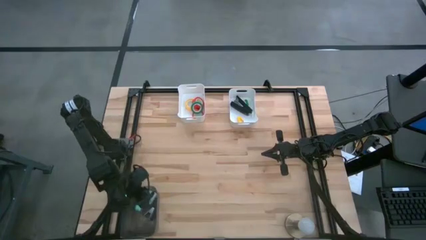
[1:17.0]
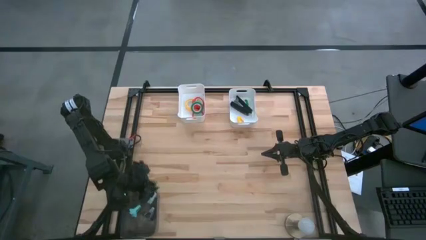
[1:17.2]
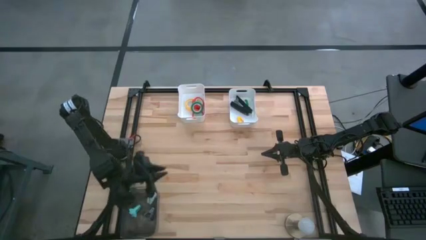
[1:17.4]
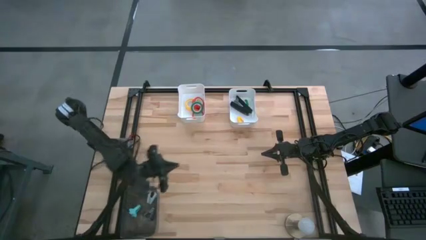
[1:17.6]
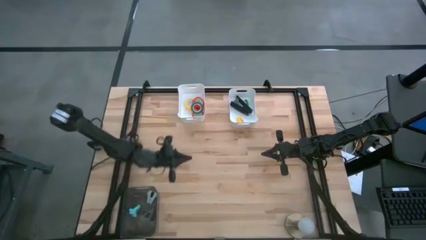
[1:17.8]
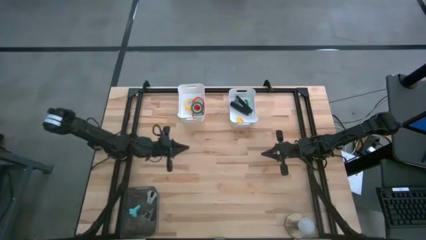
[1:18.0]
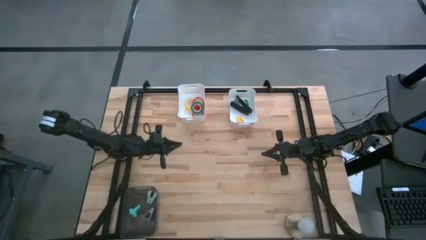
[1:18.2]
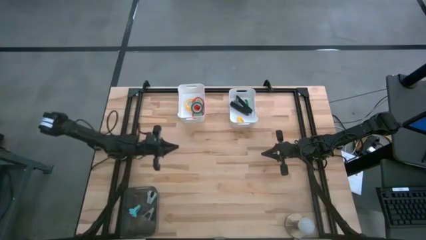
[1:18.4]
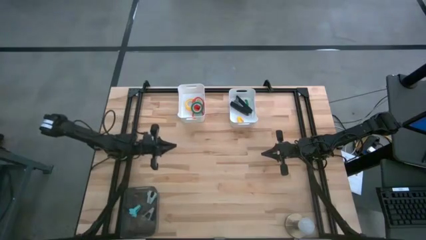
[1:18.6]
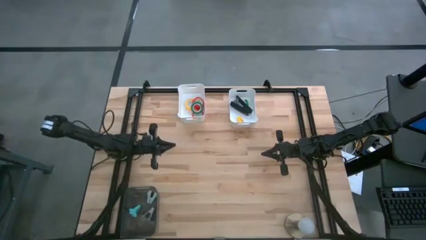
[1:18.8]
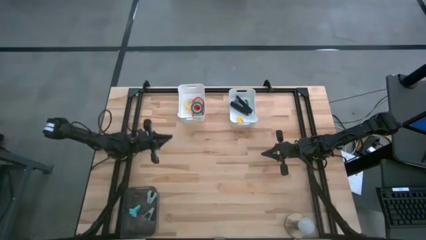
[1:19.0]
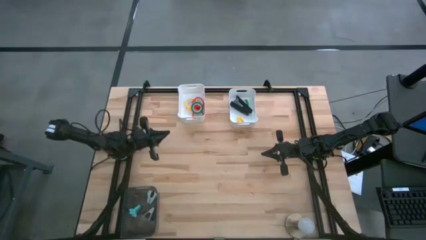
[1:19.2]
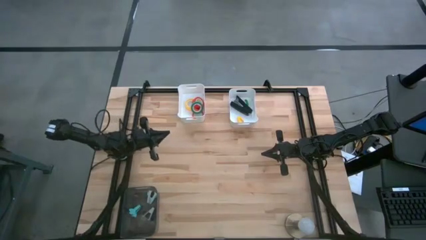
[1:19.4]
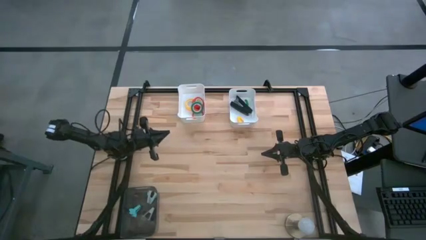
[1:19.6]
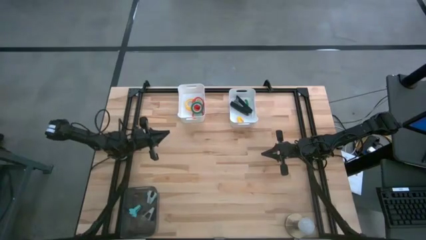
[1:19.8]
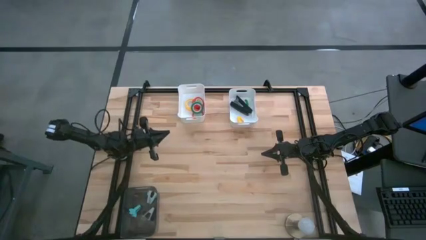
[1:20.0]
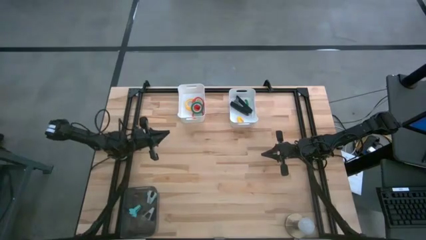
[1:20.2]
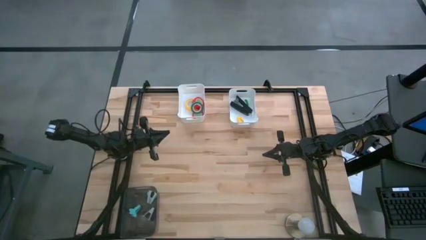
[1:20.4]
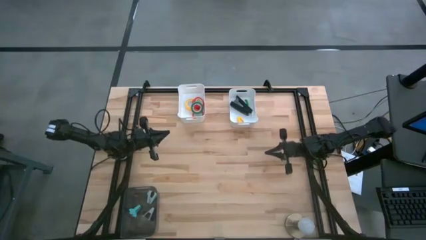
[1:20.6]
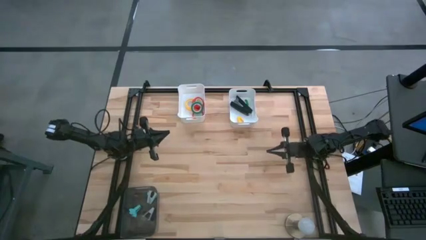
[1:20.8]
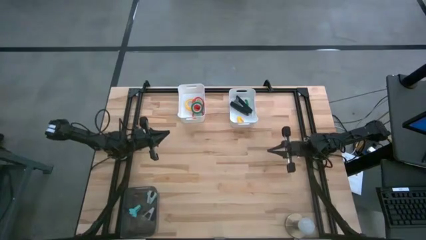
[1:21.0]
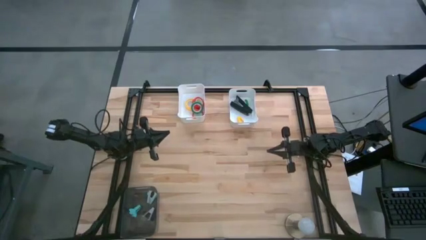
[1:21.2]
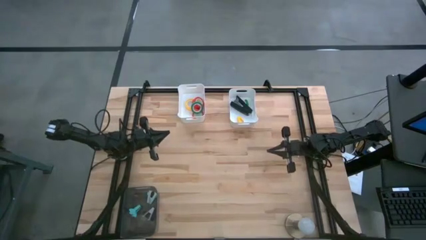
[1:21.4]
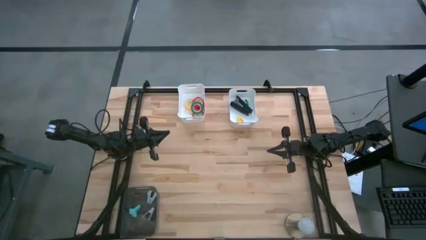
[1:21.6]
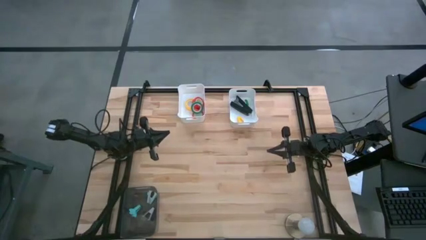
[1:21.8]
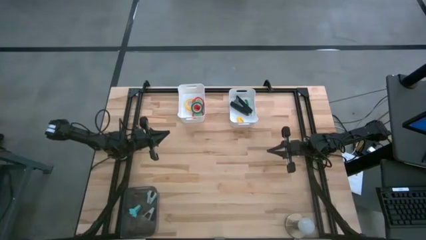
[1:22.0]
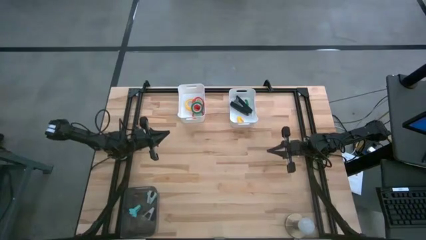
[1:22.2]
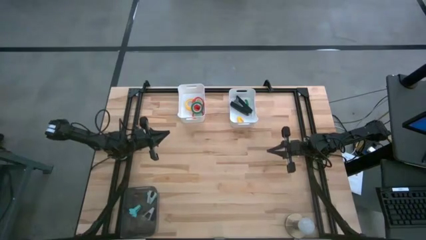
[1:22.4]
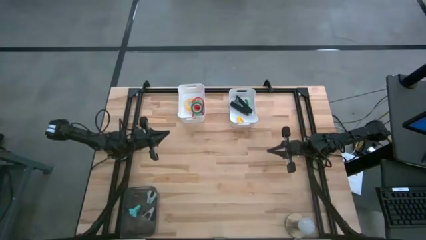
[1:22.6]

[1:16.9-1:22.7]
Task: Pick and place Stapler, Stapler remover, tape
Return to Home Position

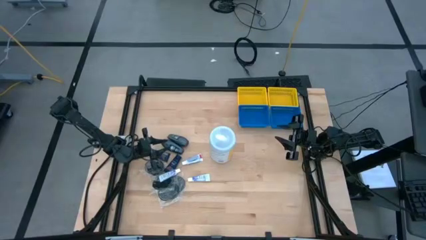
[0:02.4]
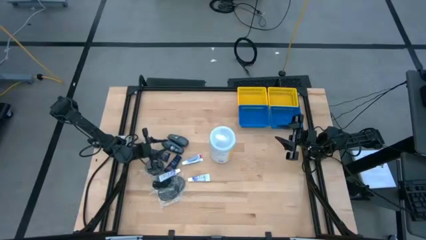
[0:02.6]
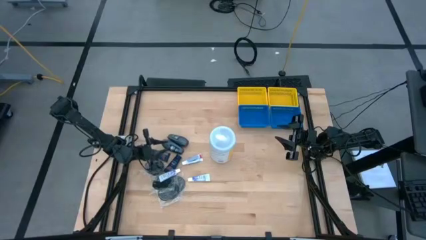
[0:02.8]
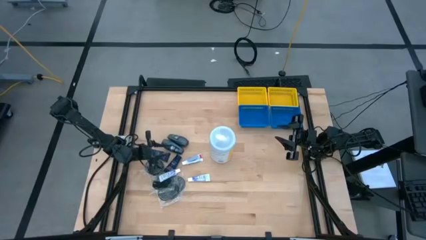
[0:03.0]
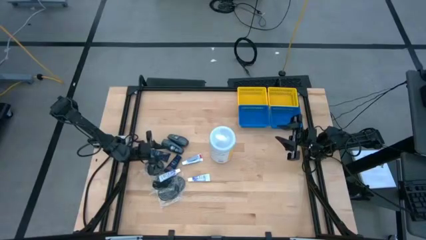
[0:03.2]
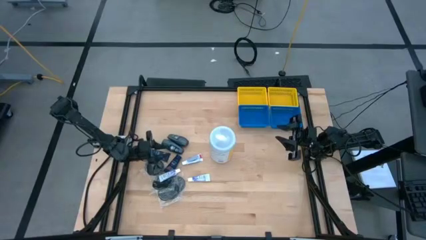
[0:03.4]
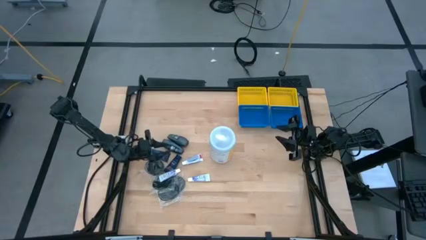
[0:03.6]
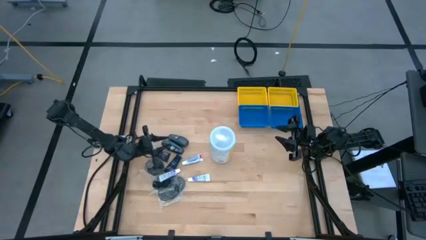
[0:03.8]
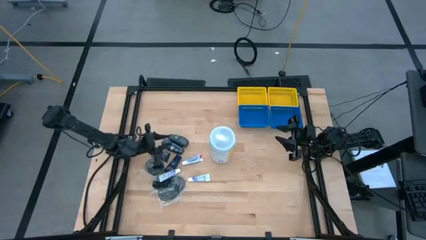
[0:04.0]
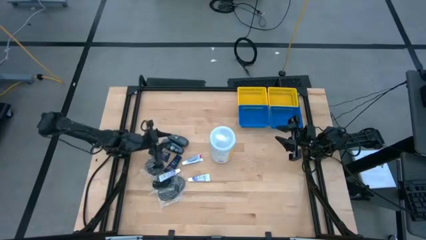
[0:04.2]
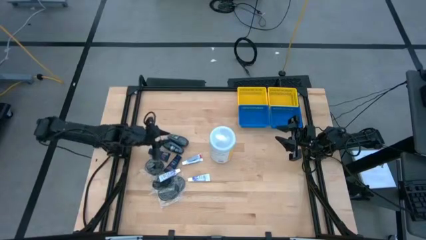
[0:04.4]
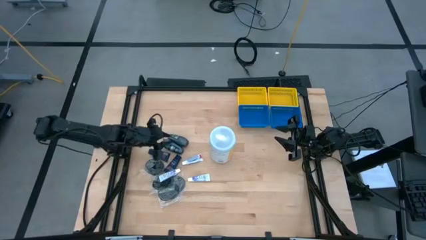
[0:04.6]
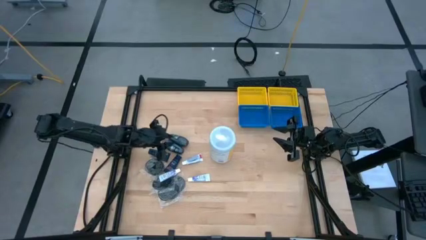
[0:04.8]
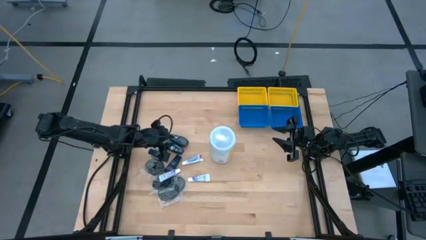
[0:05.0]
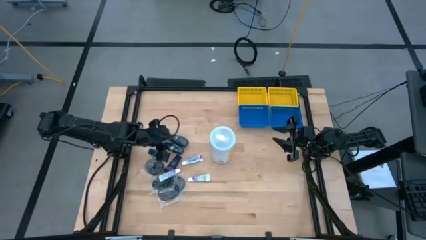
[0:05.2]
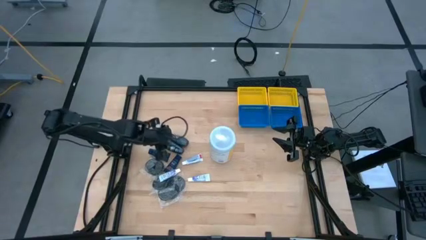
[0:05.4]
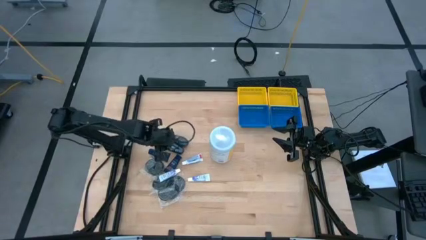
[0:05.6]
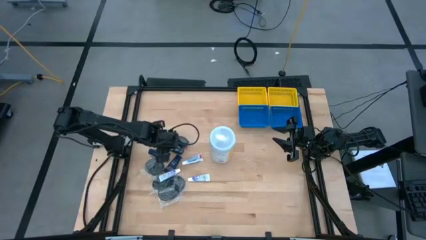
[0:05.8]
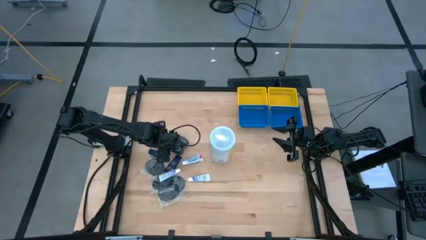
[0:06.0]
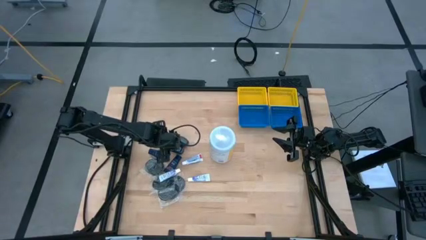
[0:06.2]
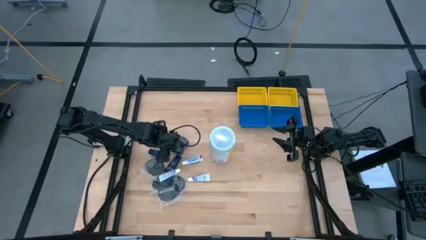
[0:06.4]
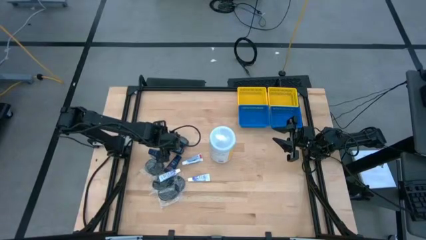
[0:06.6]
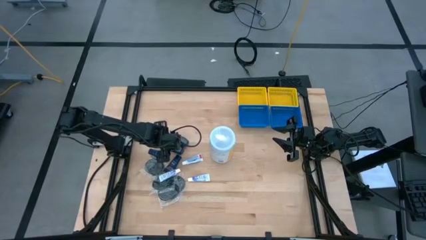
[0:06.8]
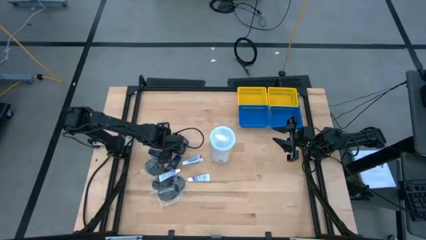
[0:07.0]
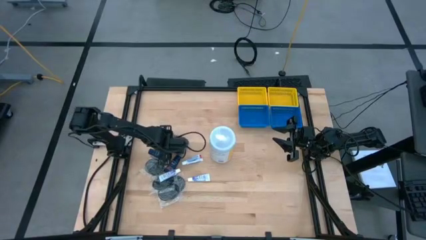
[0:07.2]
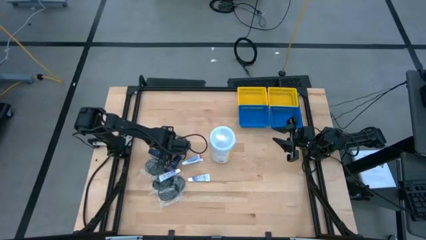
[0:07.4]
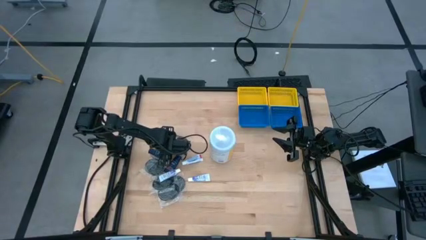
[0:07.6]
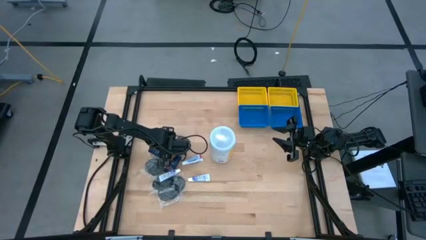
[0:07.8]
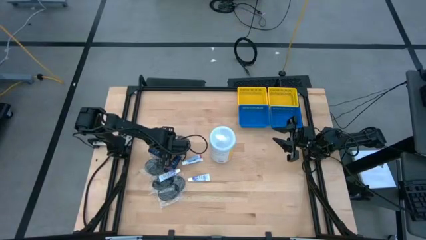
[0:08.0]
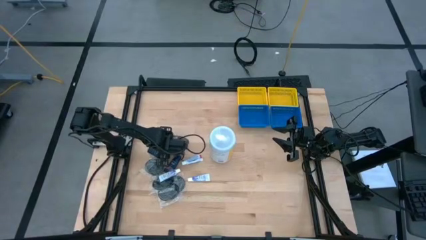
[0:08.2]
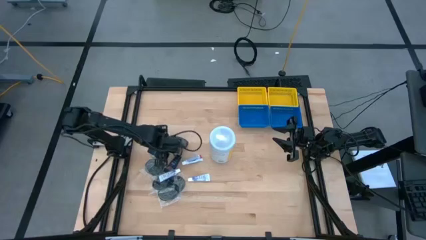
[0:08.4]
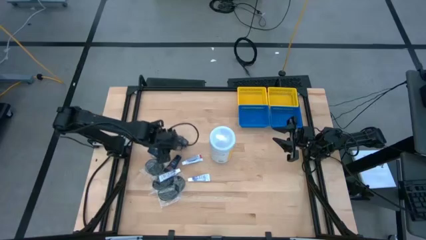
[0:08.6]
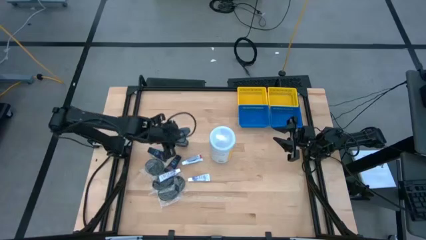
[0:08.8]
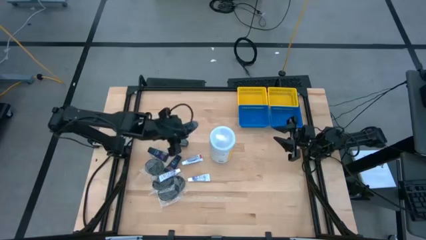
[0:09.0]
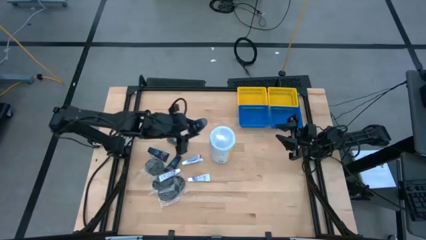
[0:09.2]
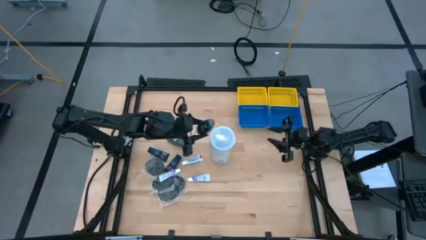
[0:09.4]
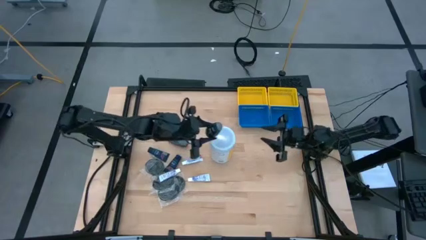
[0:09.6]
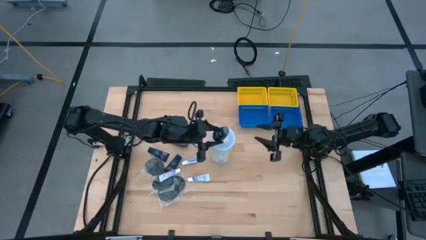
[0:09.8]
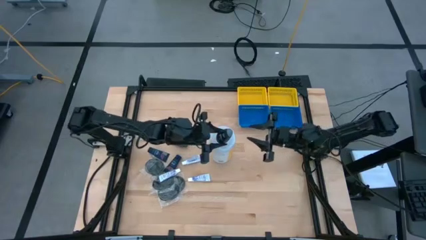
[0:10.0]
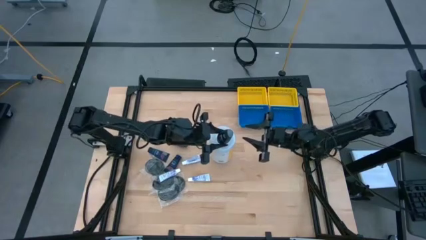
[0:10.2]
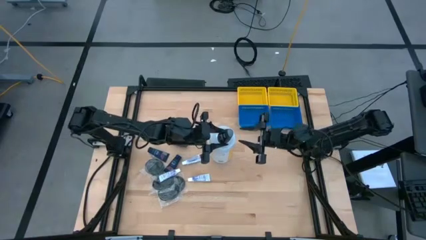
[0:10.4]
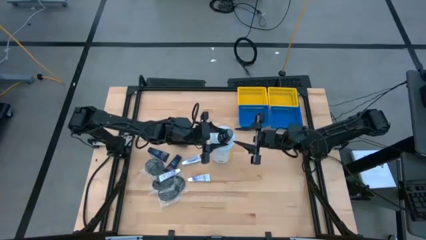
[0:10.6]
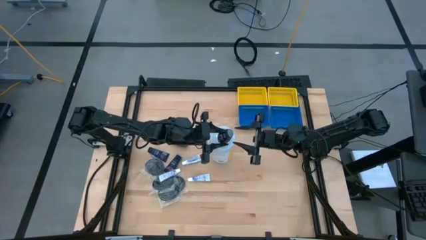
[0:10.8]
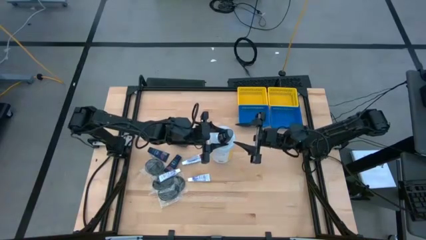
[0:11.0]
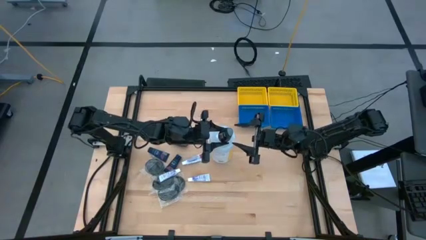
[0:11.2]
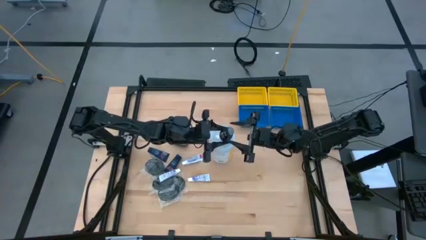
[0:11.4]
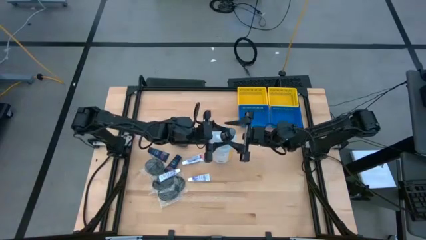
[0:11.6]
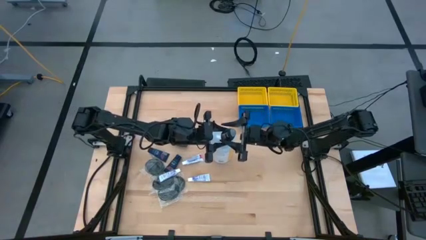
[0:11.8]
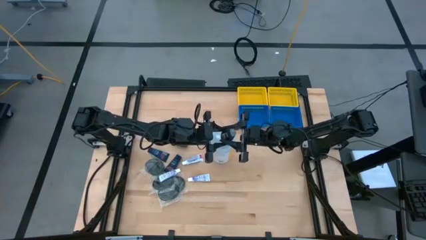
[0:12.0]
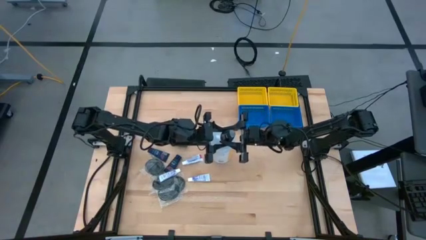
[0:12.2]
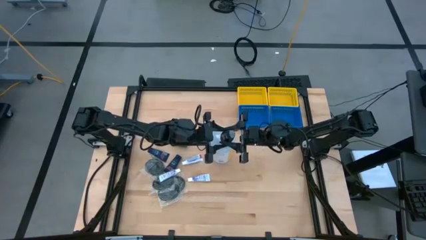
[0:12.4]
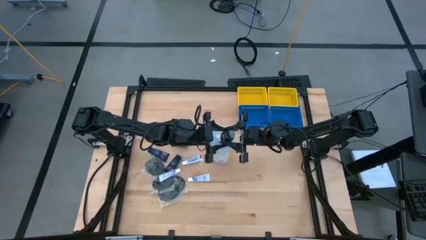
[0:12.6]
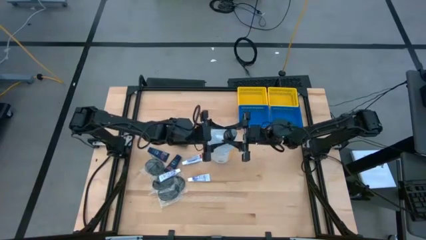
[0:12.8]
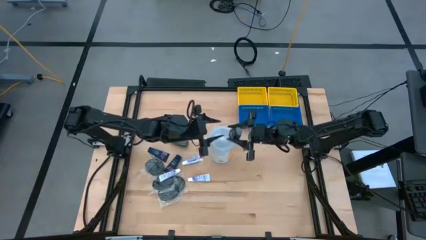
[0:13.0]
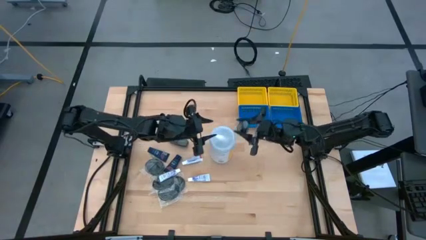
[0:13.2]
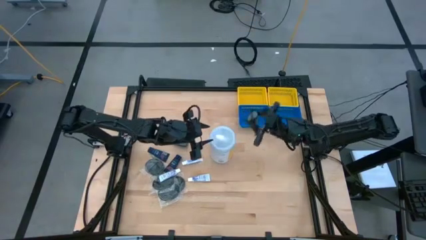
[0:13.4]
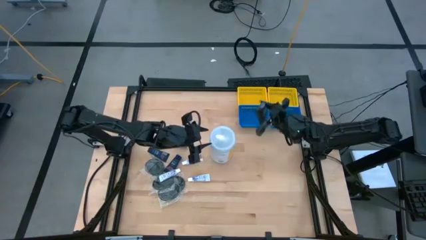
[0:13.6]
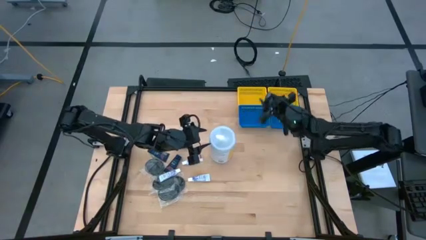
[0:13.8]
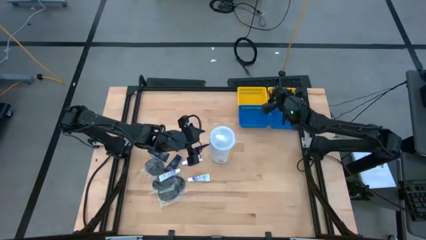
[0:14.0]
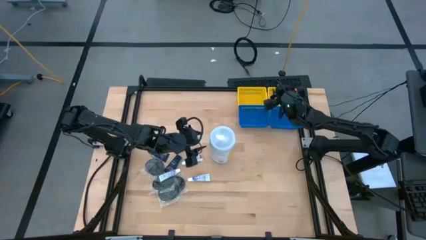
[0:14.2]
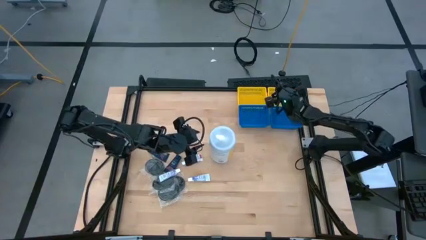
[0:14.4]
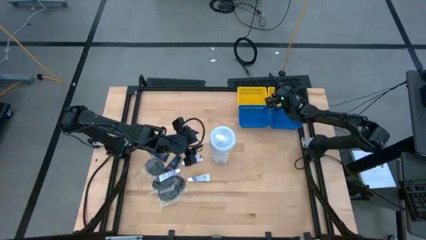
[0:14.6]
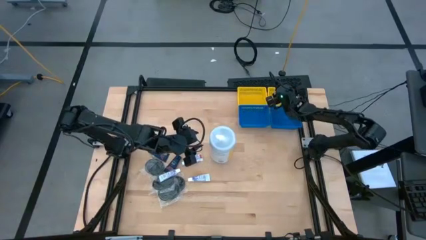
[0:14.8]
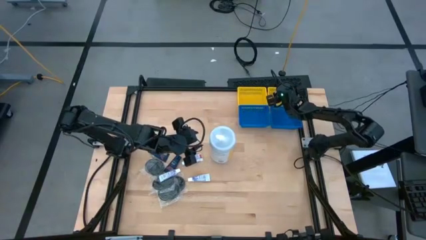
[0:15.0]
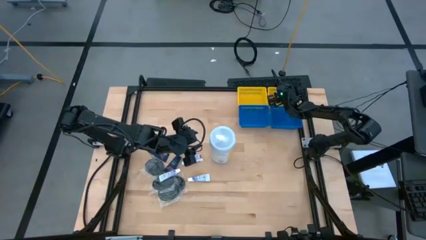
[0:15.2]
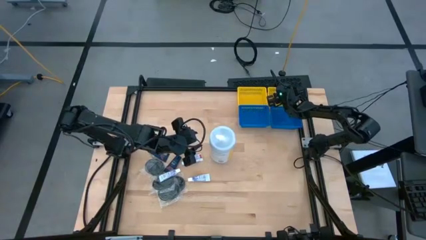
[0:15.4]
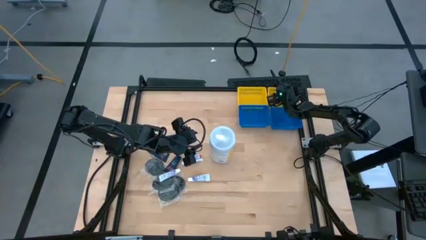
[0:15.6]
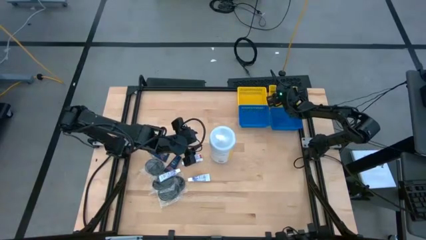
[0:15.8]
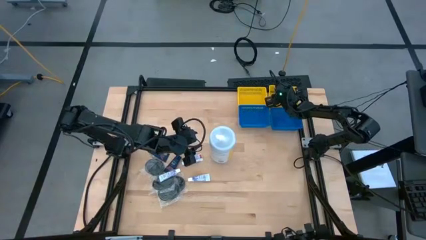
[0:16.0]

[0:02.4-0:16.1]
Task: Pick & Place Travel size toiletries
Put the black deodorant into the right yellow bin
